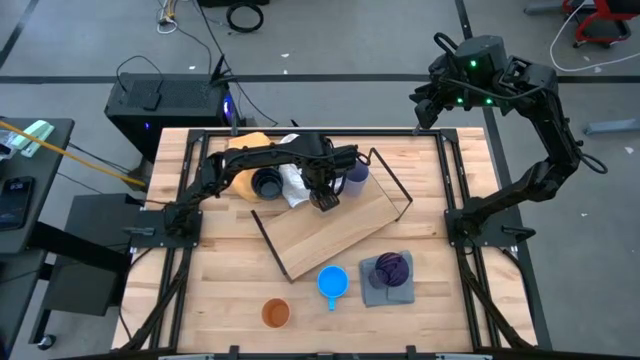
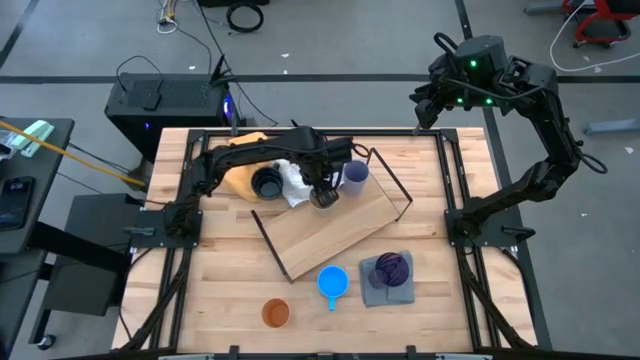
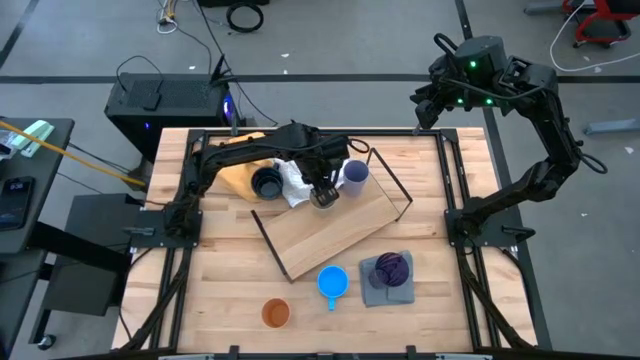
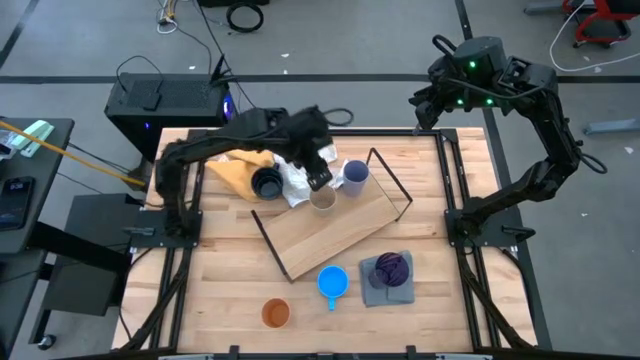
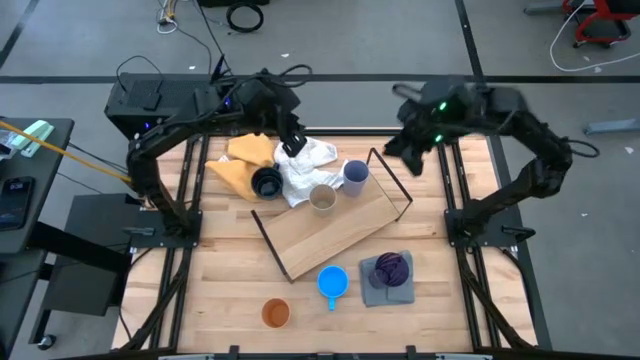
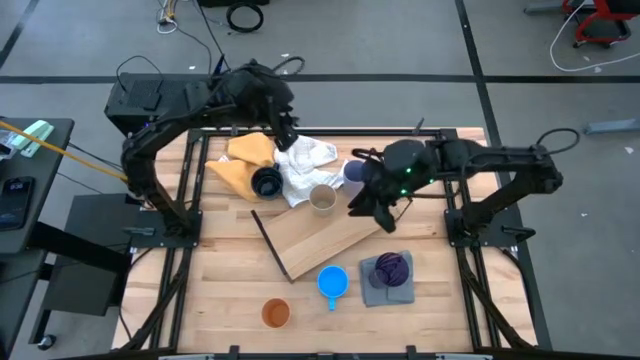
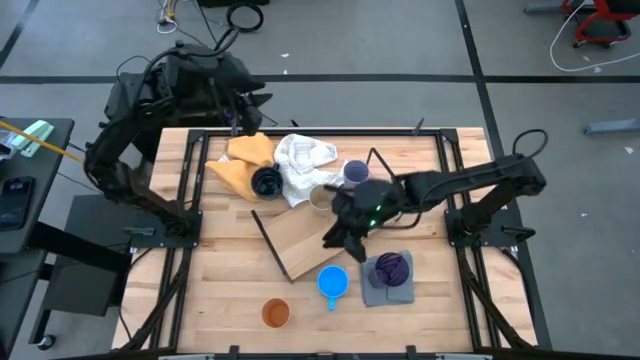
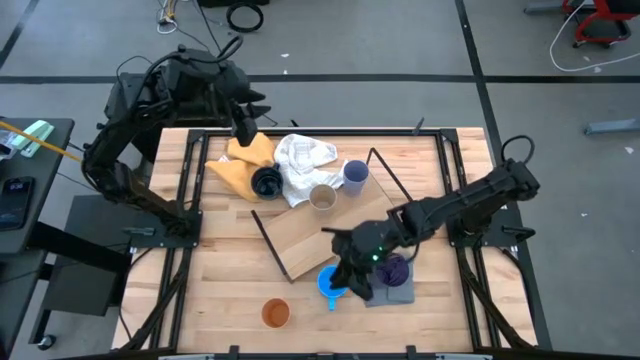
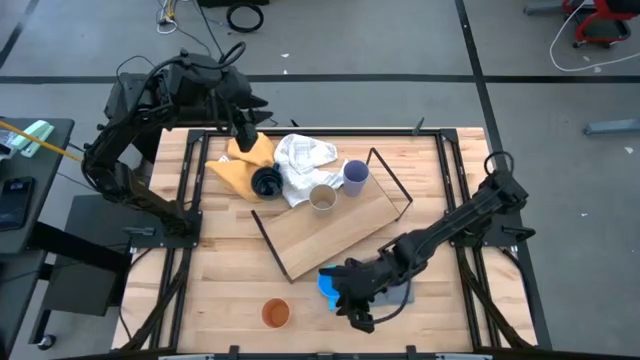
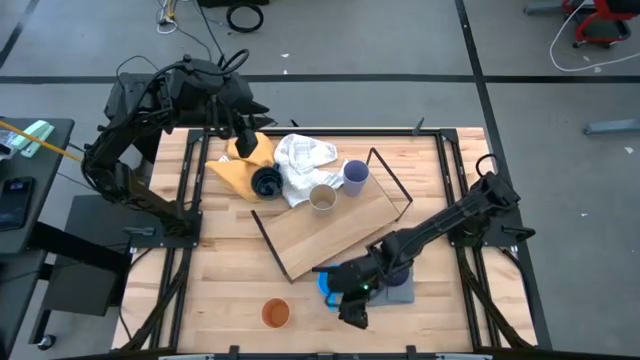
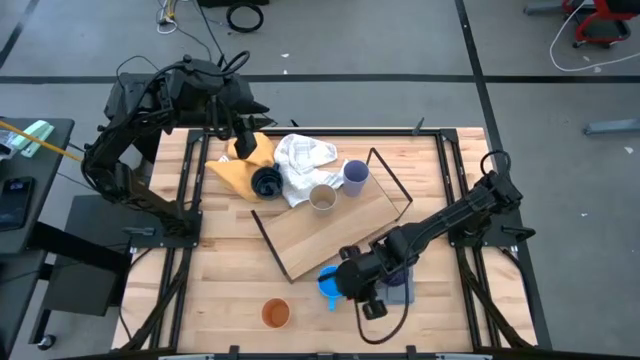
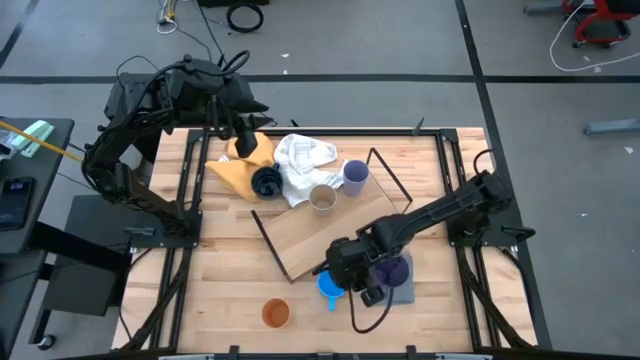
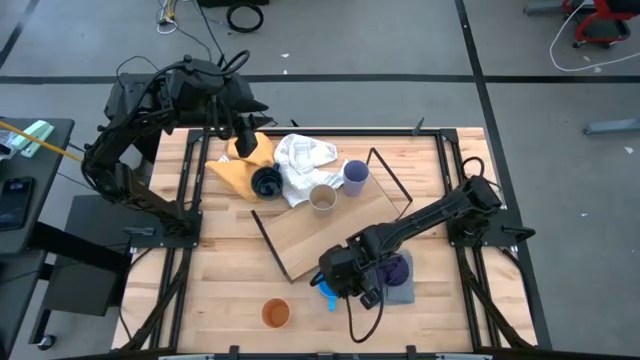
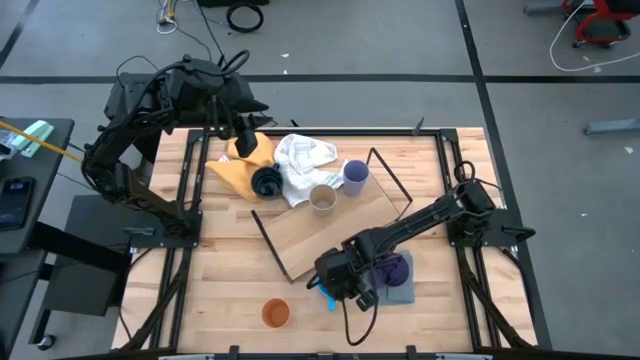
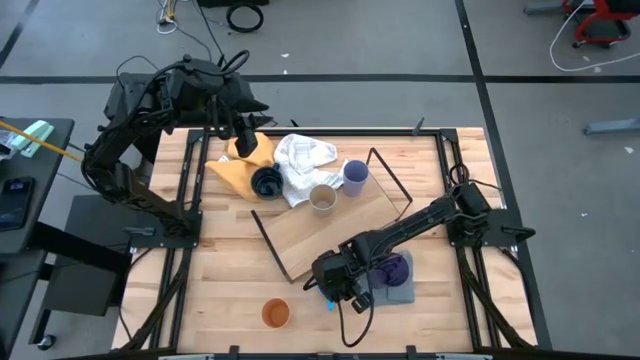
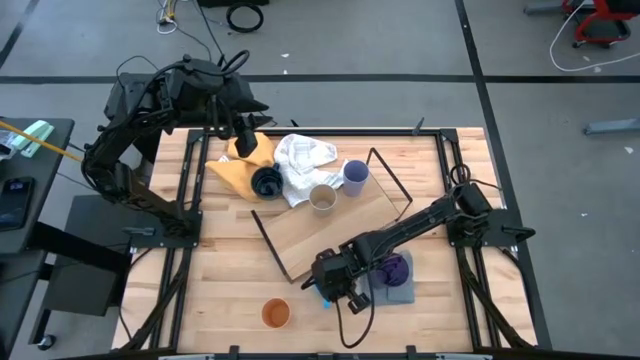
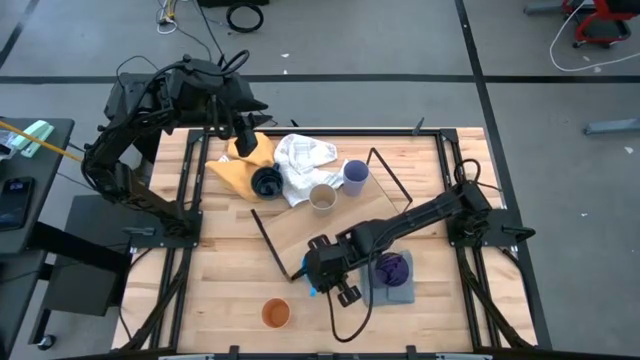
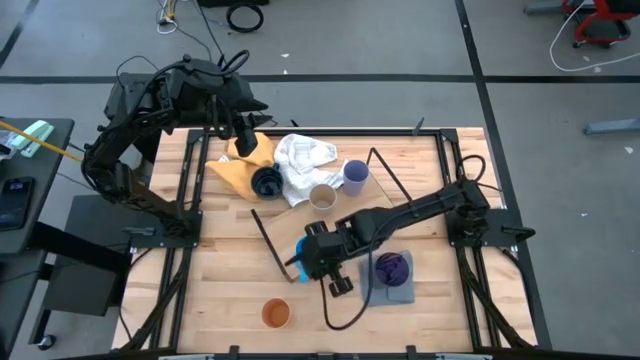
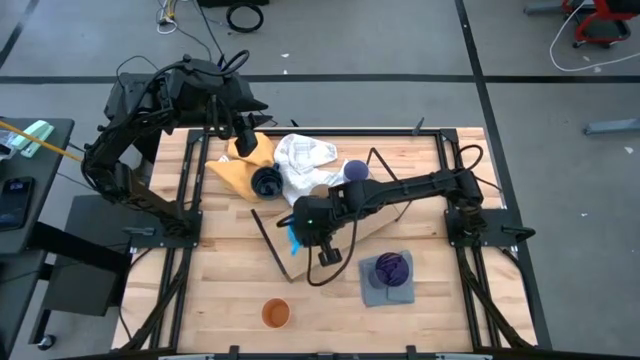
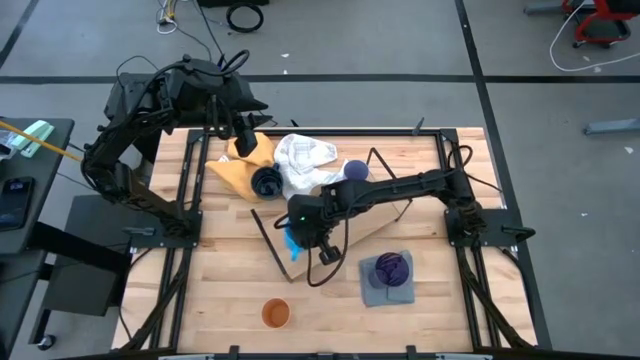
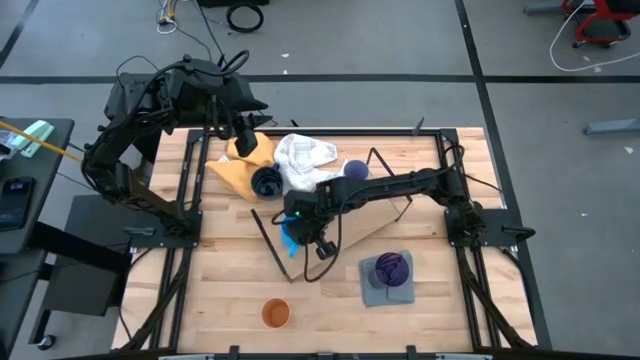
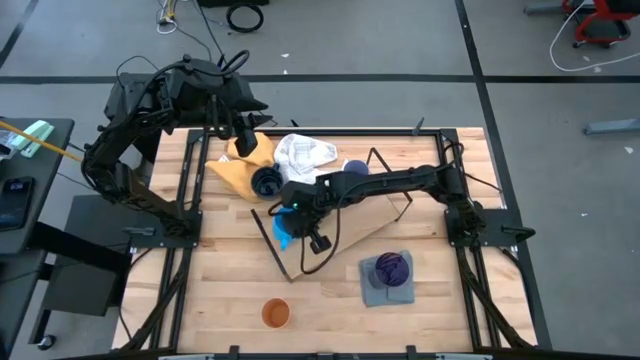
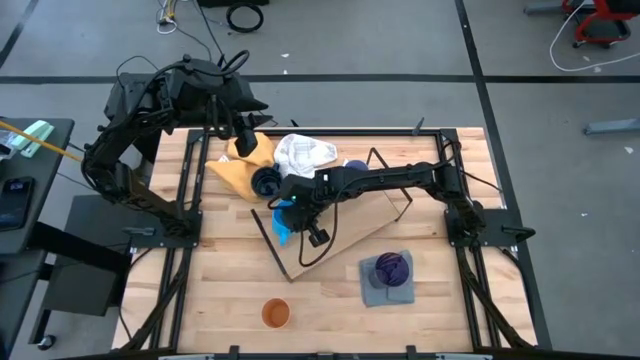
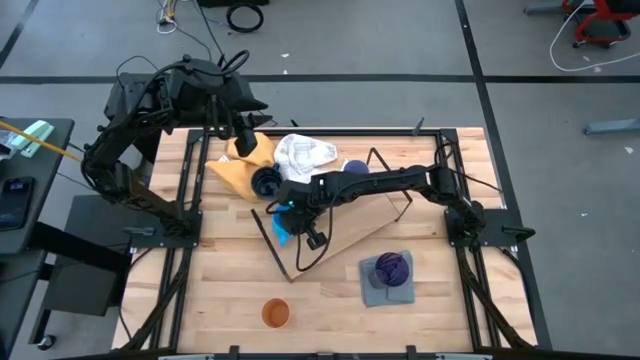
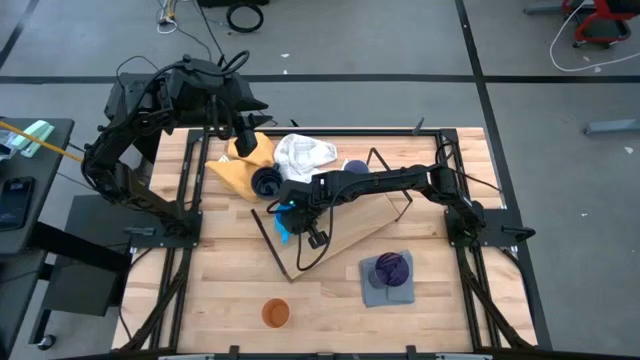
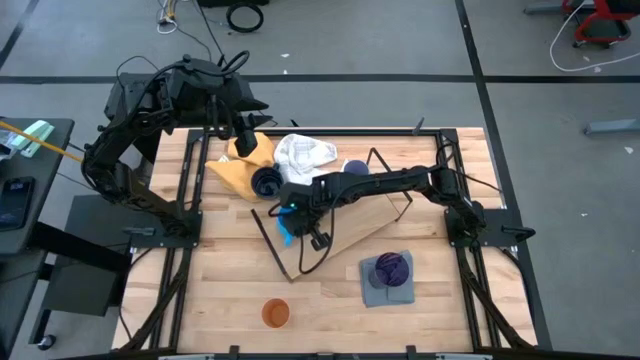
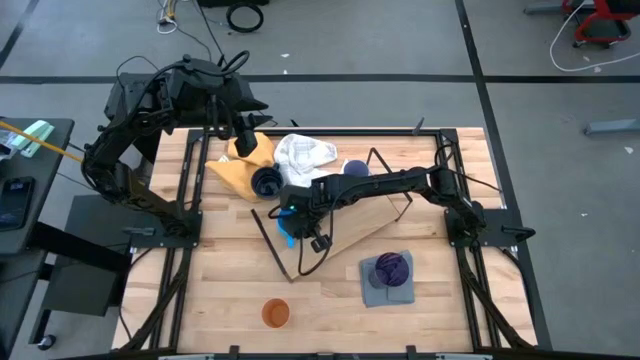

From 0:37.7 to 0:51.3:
Task: Stack small to large cups/mugs on shelf
Put the light blue mug on the shelf

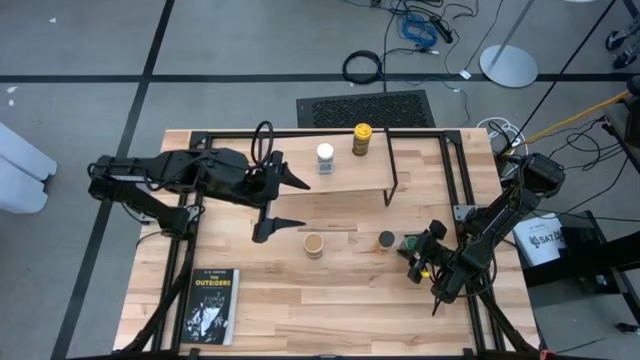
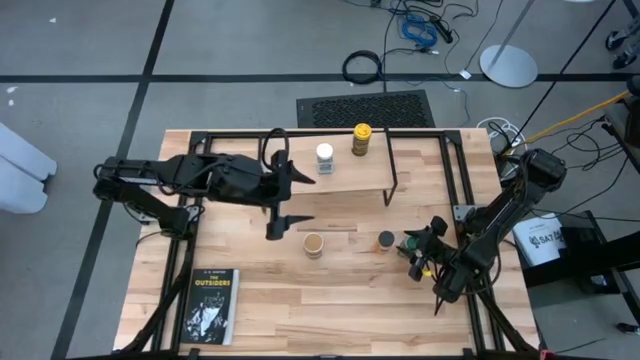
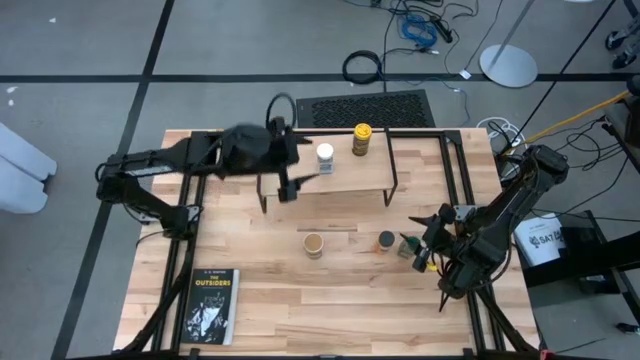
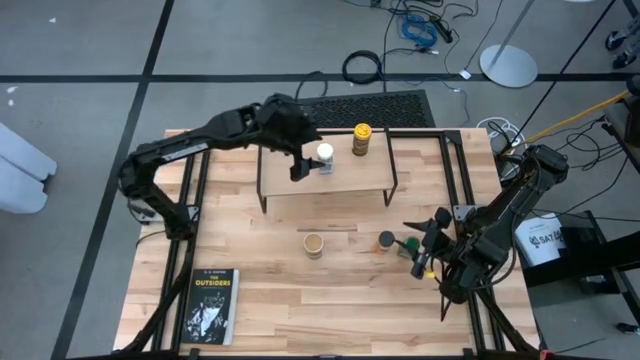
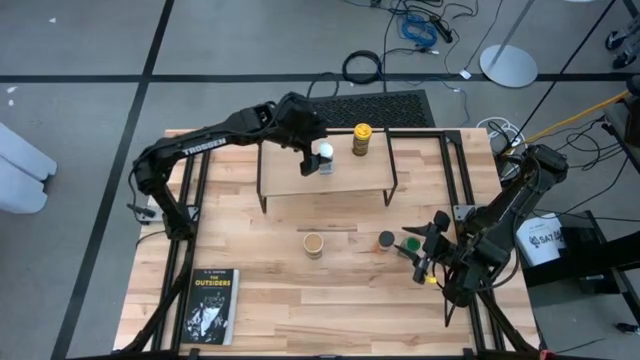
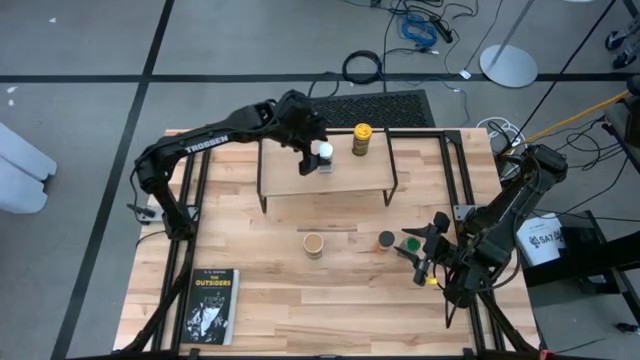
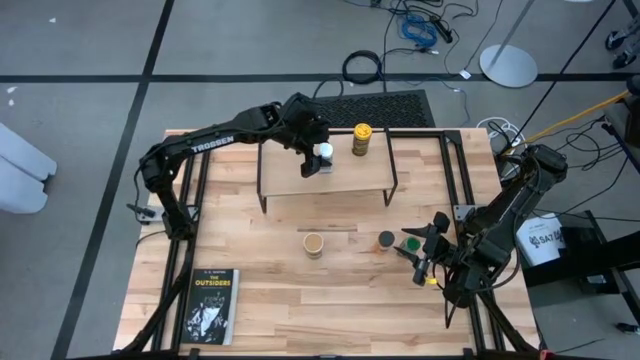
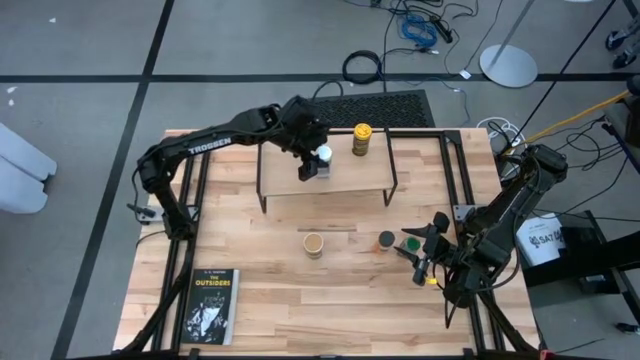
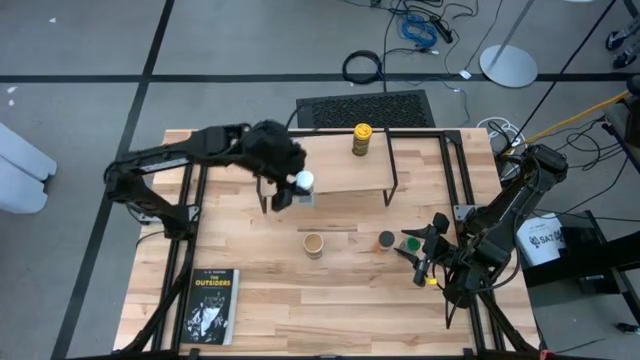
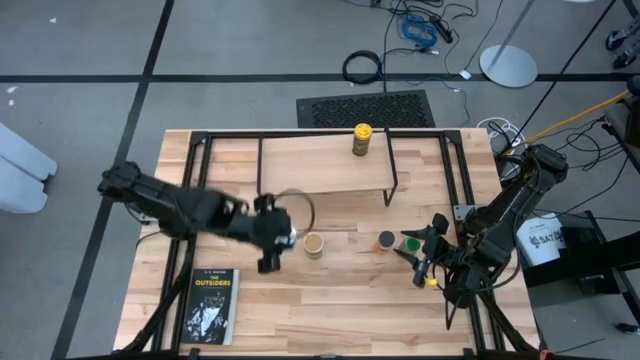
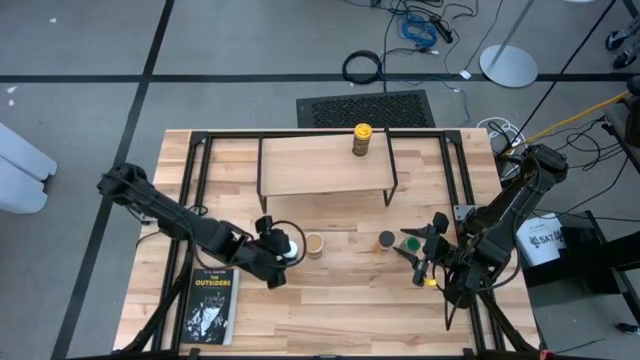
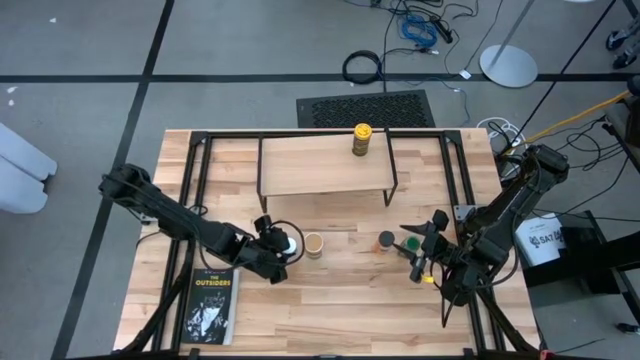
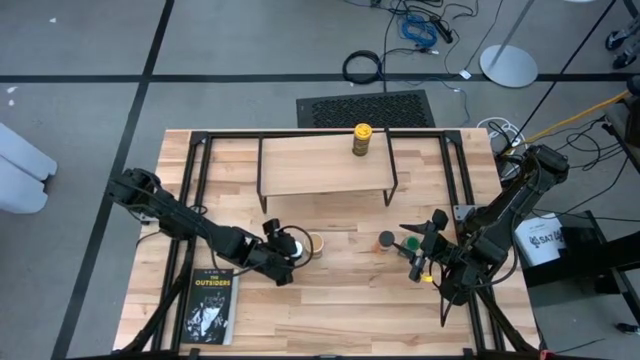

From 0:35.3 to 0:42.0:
Task: Shelf spices
Remove the white seasoning bottle from the shelf
